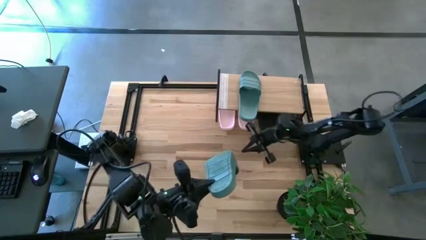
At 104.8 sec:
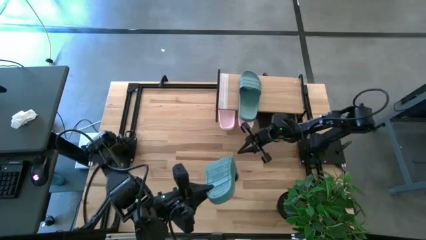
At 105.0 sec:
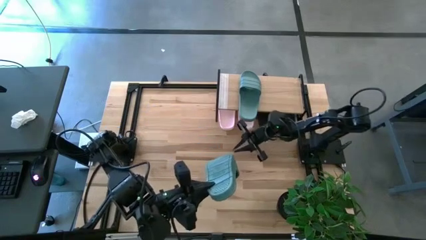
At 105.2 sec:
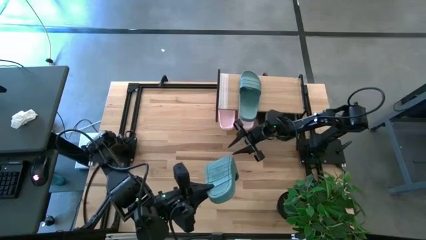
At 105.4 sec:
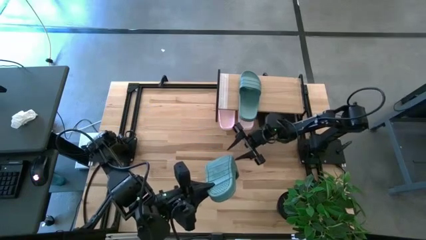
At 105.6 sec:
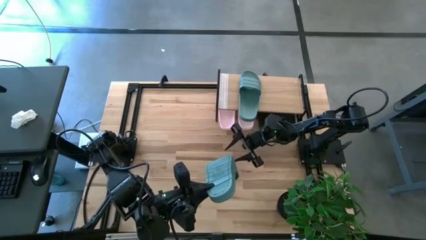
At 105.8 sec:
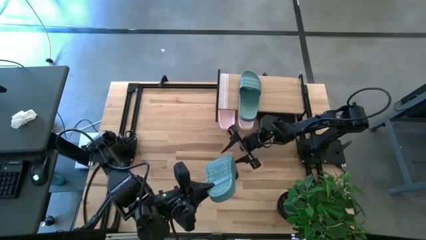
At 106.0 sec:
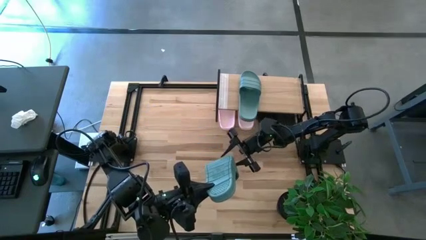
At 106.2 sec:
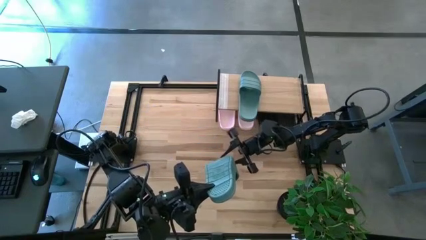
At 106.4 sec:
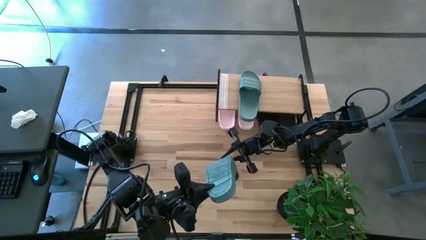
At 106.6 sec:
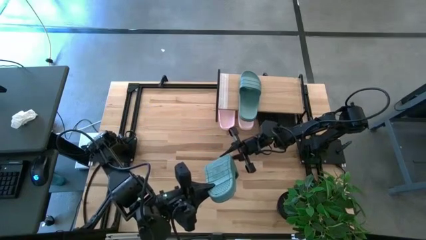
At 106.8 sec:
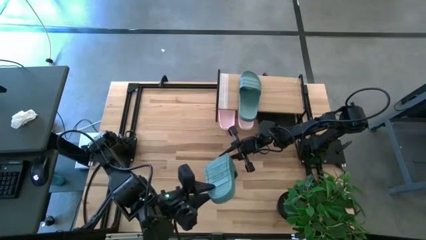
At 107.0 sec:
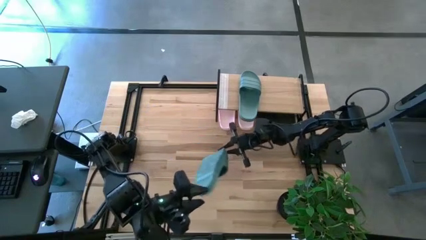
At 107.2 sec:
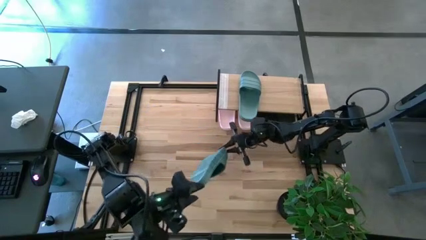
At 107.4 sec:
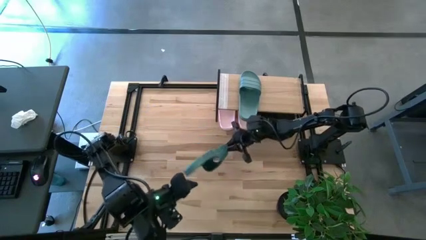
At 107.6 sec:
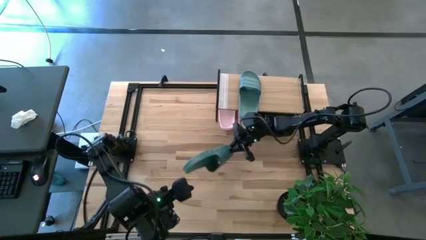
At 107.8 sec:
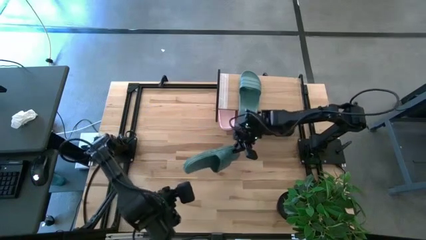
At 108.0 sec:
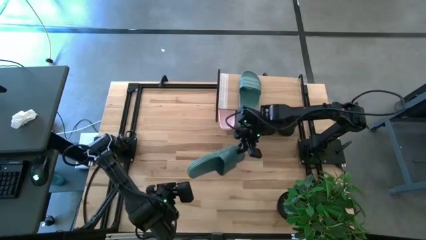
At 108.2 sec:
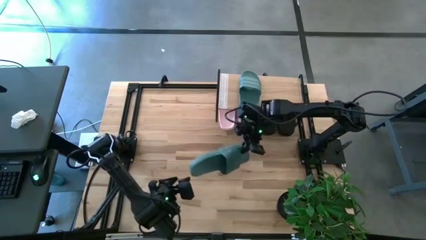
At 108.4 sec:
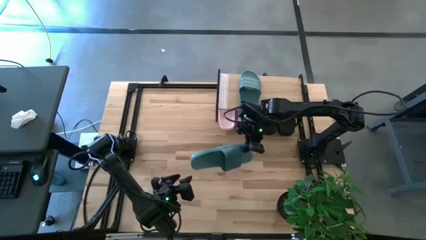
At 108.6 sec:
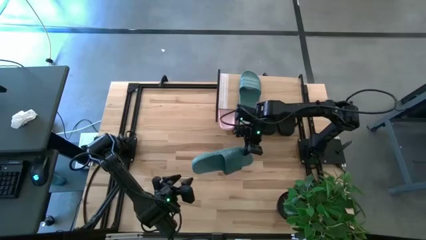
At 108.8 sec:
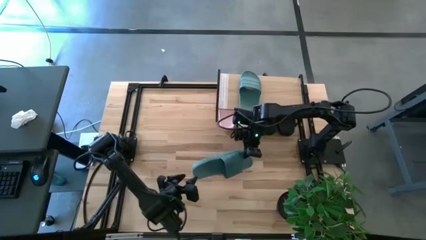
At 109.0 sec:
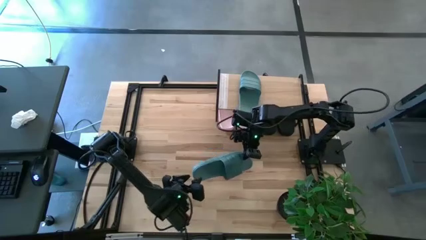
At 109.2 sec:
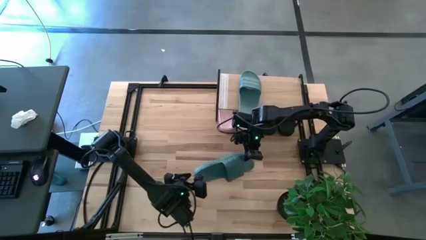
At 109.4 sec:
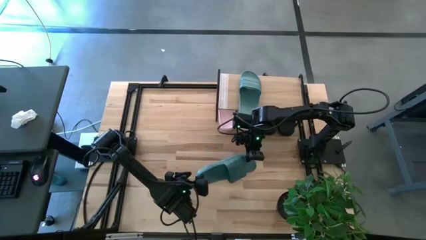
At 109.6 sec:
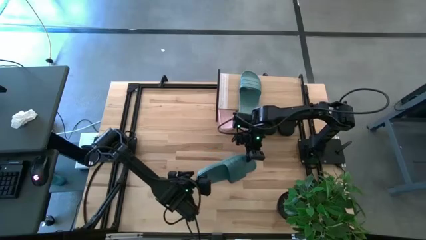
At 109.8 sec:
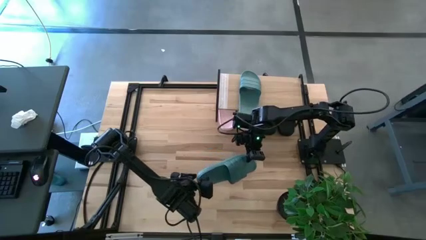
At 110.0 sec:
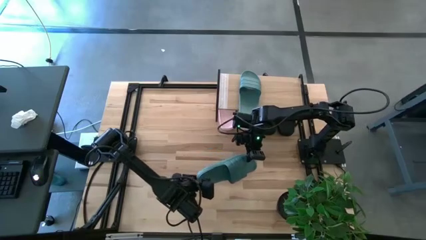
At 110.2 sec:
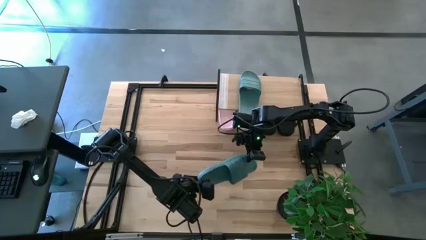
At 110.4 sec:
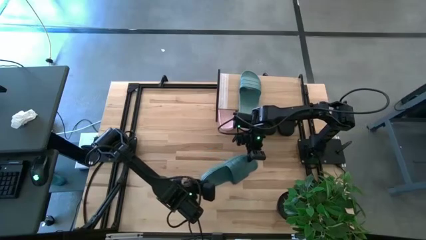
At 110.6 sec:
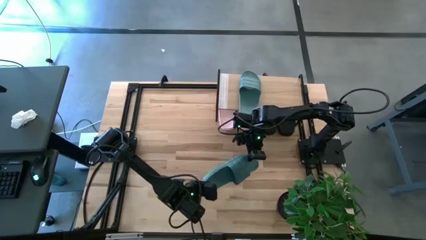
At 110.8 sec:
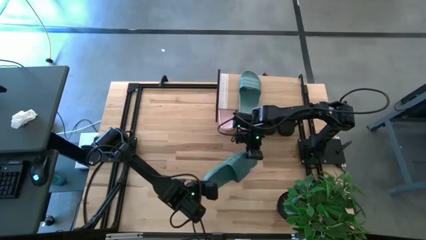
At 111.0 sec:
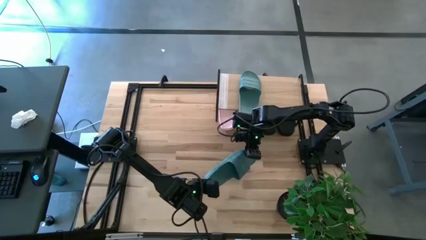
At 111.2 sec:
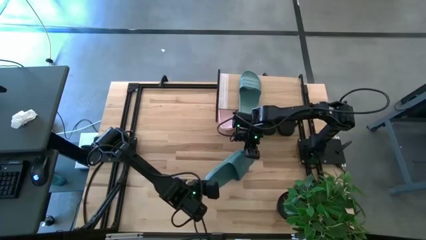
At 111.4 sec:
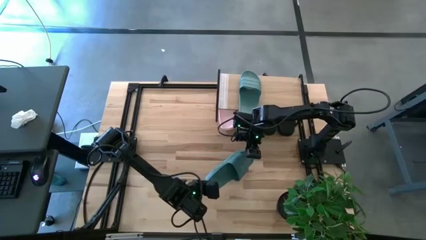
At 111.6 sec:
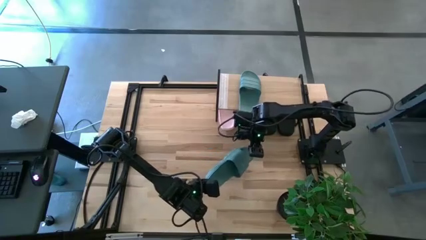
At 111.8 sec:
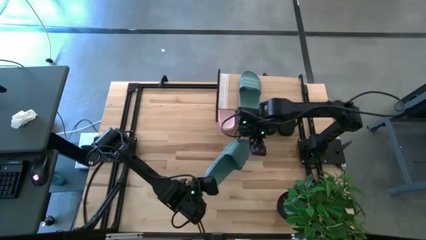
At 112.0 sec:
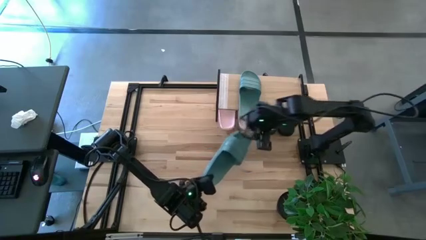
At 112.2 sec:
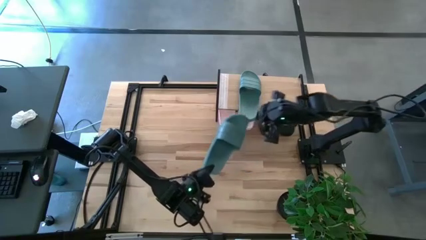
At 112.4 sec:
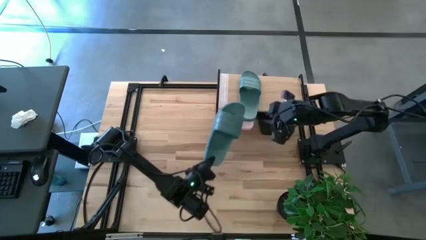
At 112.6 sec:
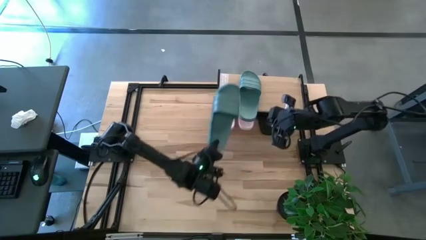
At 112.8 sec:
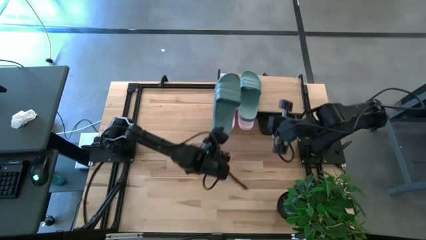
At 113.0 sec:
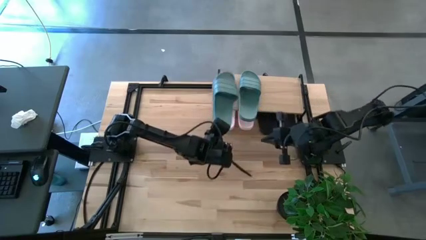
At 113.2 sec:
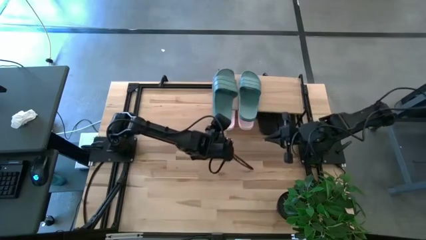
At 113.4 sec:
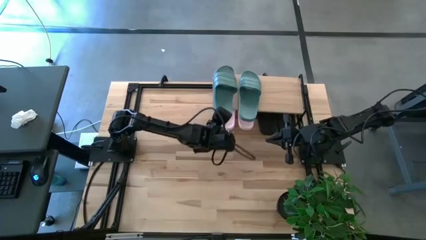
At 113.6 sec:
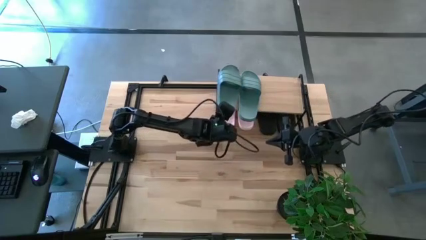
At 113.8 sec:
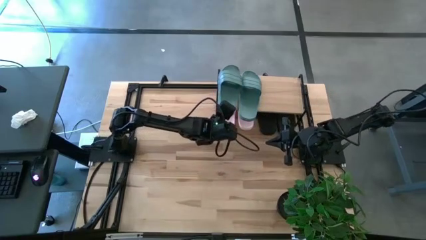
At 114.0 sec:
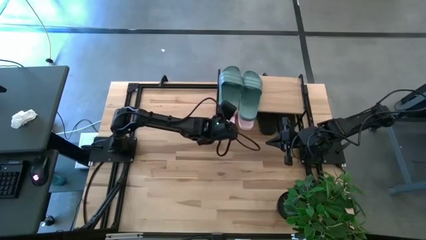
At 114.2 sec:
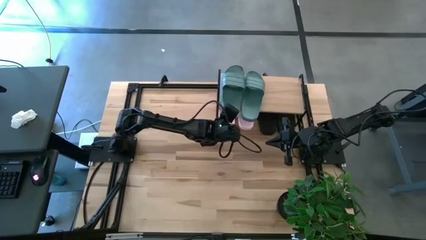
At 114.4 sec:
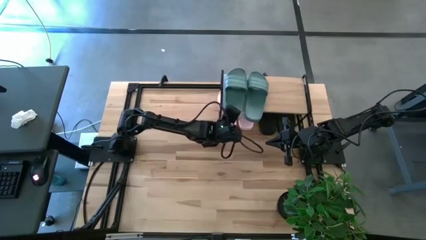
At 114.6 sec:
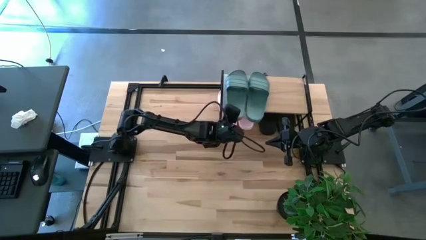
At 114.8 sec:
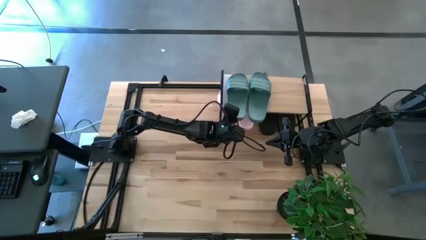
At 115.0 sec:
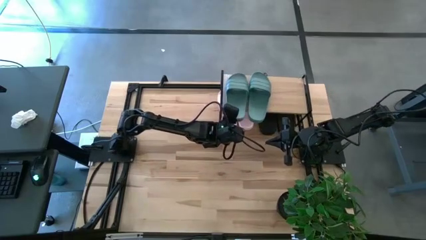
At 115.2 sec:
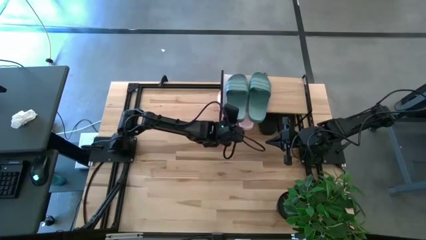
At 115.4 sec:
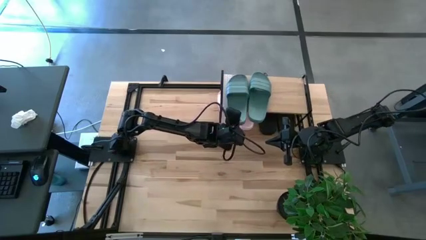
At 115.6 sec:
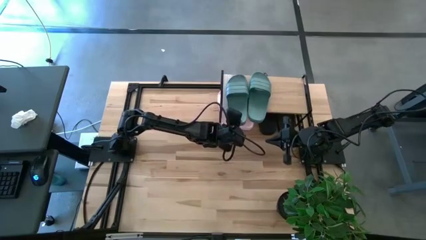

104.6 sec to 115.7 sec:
Task: Pick and place slides into the shelf
Put the green slipper on the shelf

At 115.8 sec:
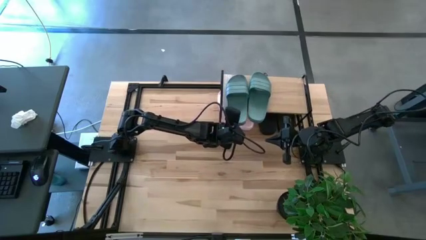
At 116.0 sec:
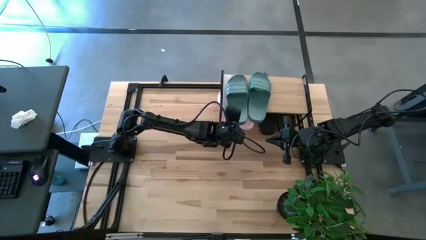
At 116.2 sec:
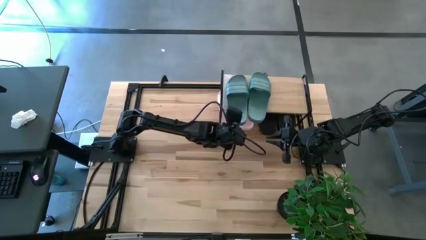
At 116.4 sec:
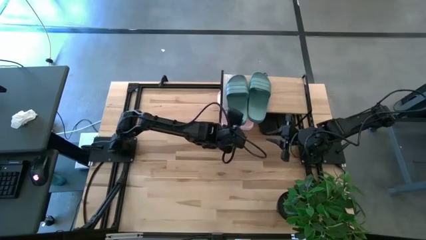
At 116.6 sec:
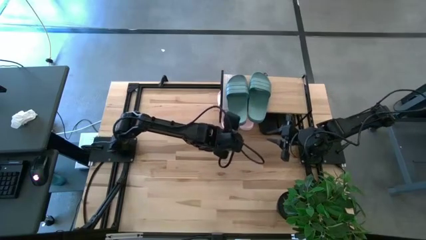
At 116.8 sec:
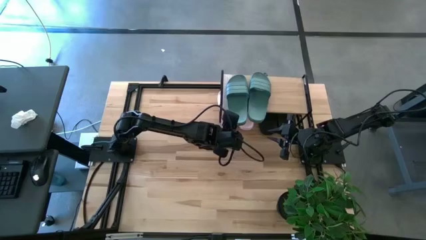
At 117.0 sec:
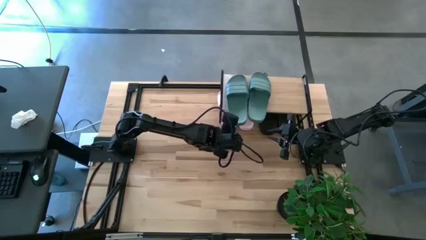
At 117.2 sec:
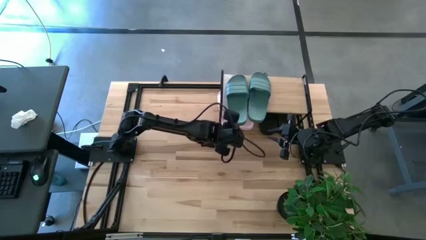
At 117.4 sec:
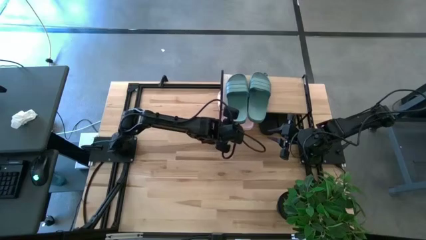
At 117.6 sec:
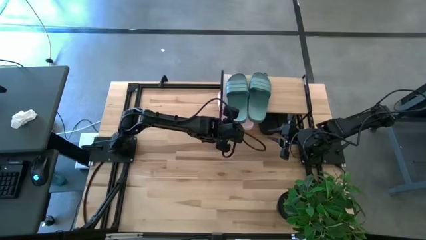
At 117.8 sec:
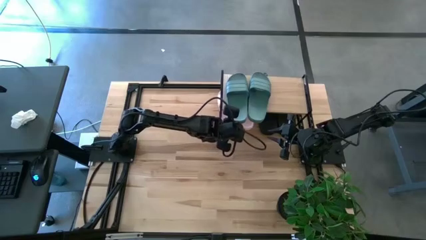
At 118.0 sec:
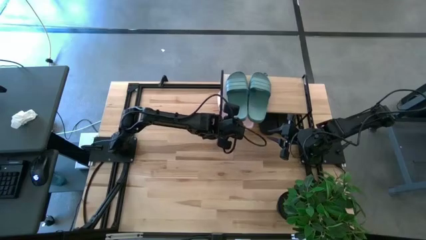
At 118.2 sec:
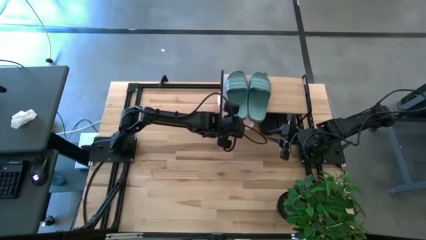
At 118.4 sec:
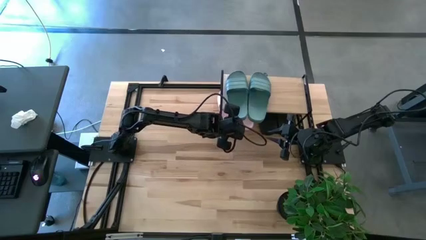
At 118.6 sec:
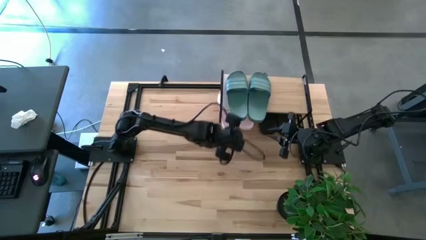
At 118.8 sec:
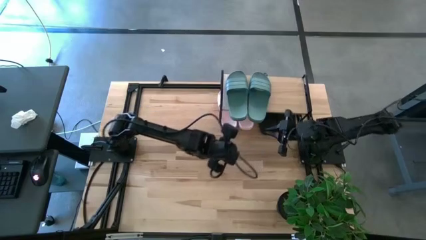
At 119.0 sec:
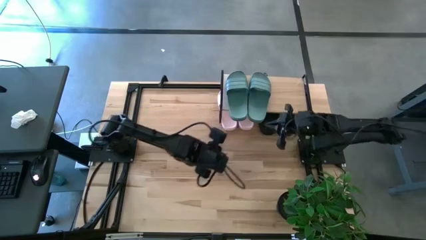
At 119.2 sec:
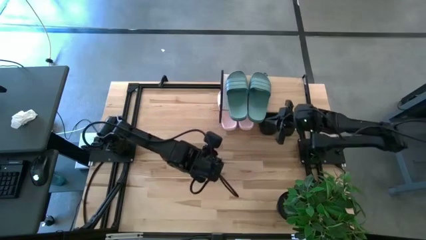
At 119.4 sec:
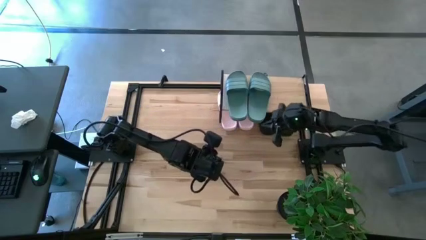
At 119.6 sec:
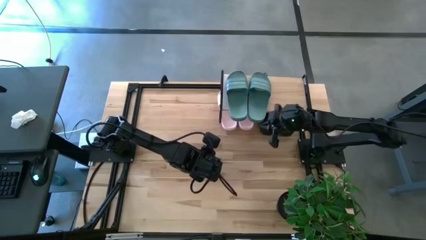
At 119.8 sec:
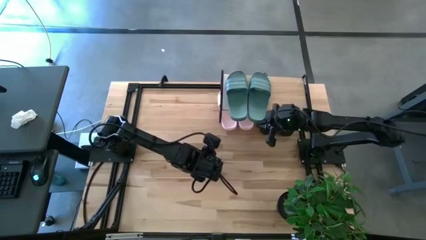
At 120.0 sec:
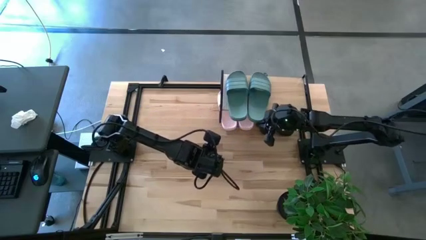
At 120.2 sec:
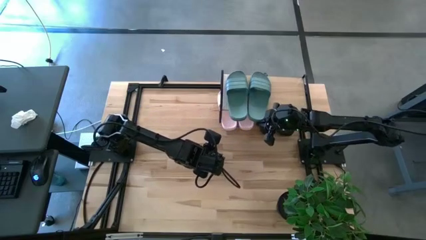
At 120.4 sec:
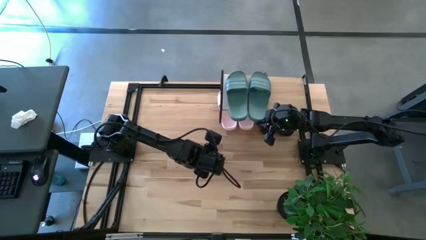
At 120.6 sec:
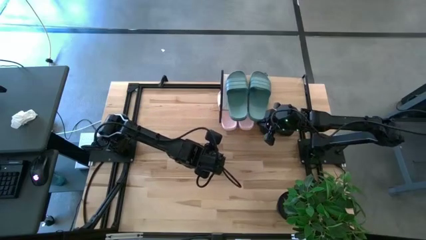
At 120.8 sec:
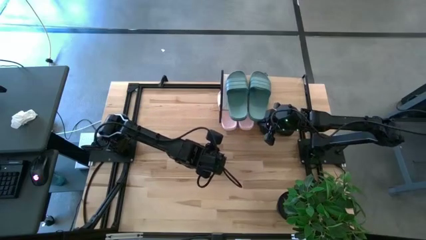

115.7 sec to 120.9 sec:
Adjust the light blue slippers on the shelf
